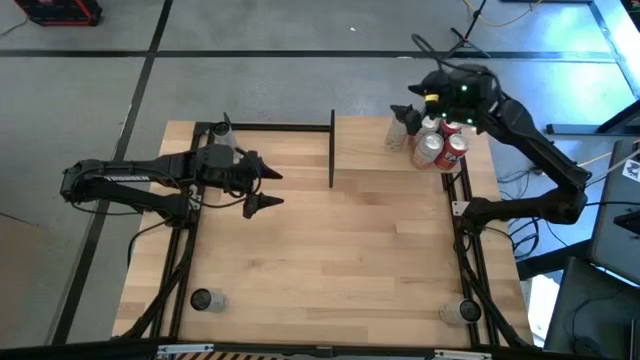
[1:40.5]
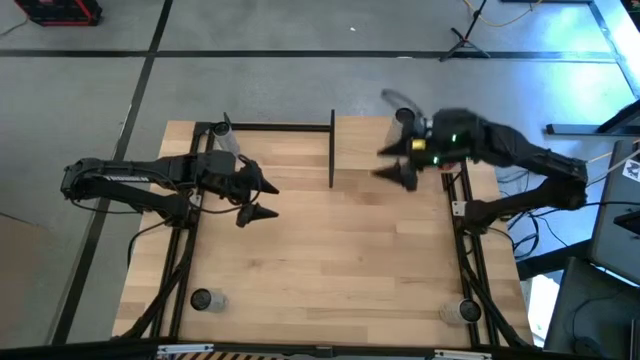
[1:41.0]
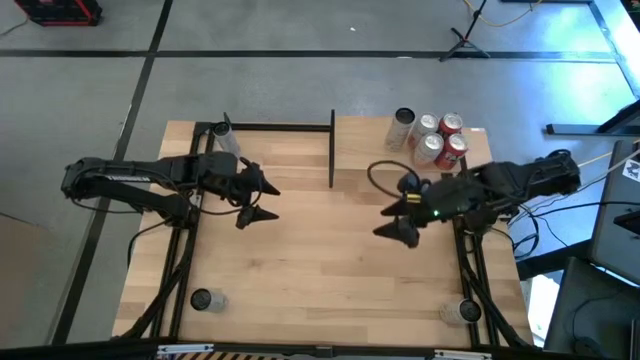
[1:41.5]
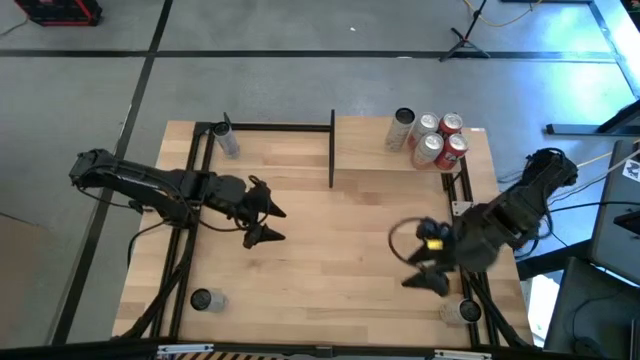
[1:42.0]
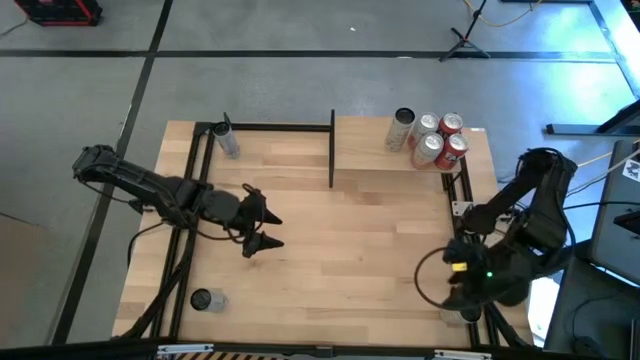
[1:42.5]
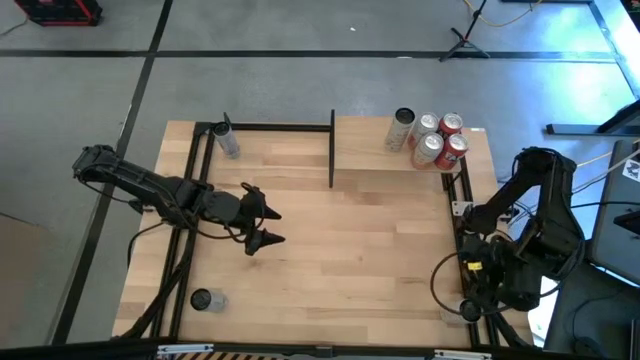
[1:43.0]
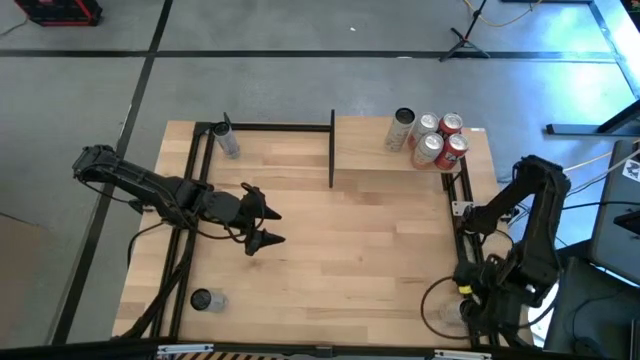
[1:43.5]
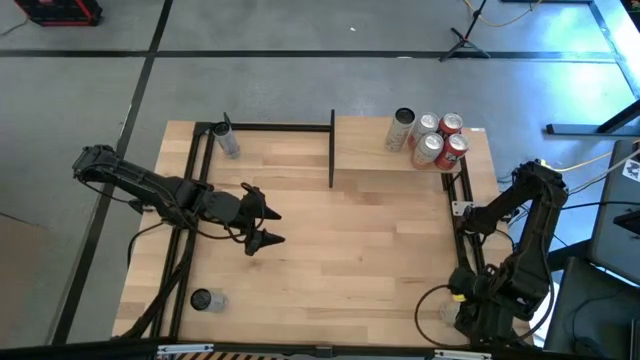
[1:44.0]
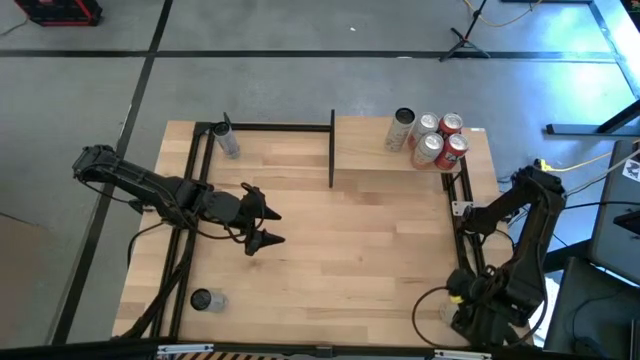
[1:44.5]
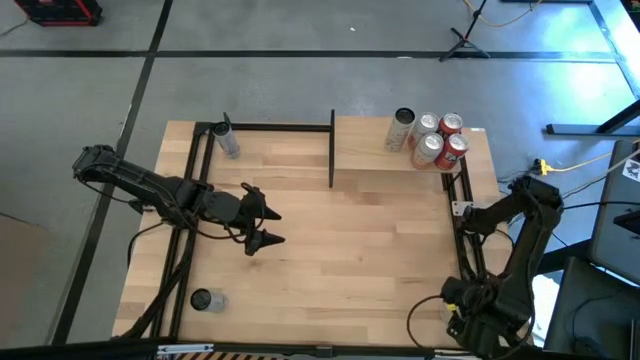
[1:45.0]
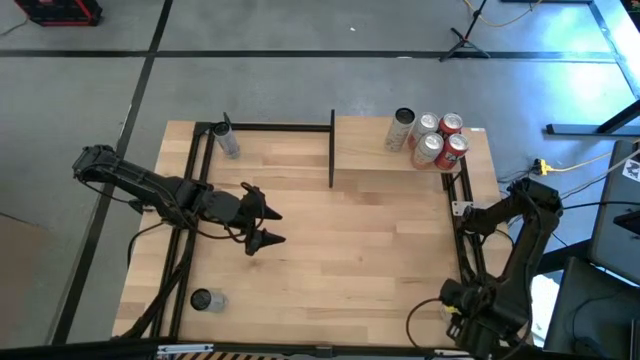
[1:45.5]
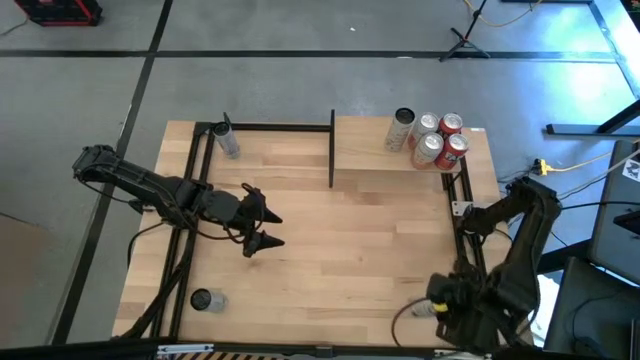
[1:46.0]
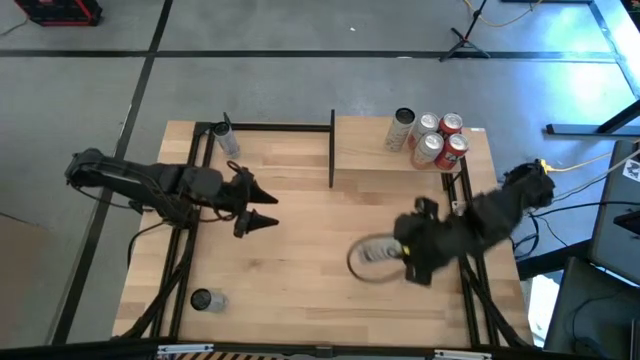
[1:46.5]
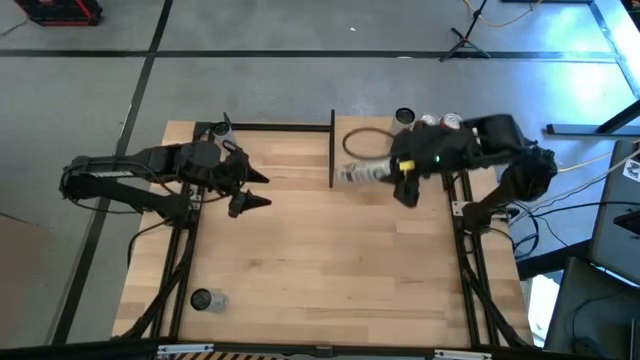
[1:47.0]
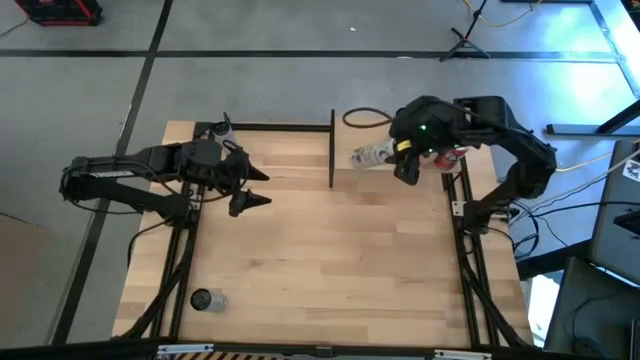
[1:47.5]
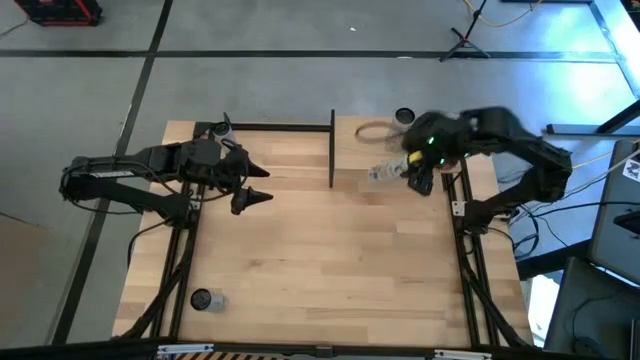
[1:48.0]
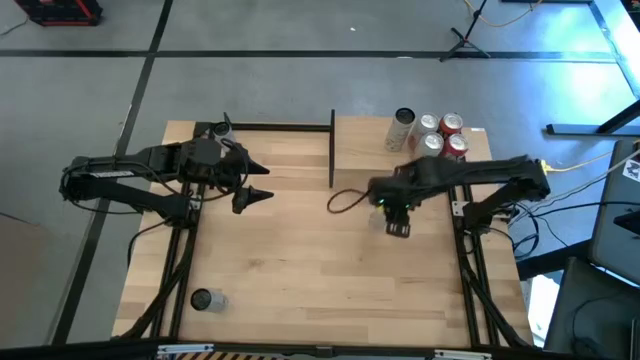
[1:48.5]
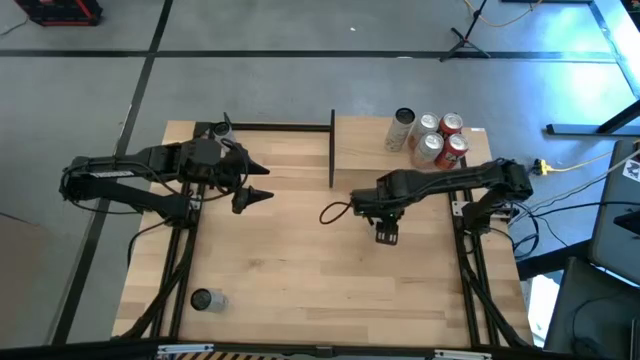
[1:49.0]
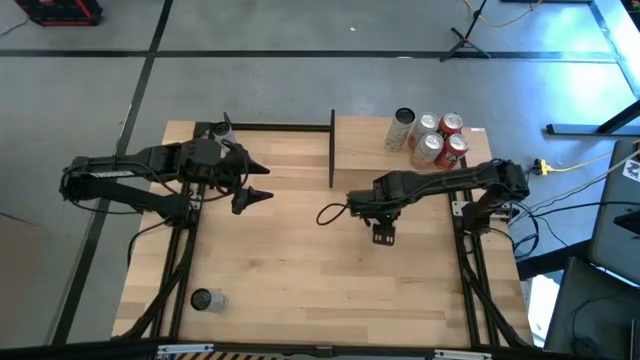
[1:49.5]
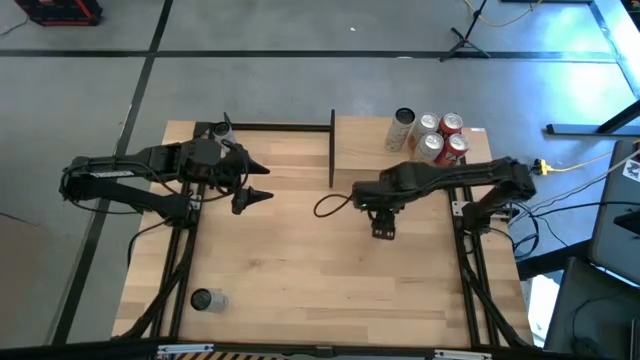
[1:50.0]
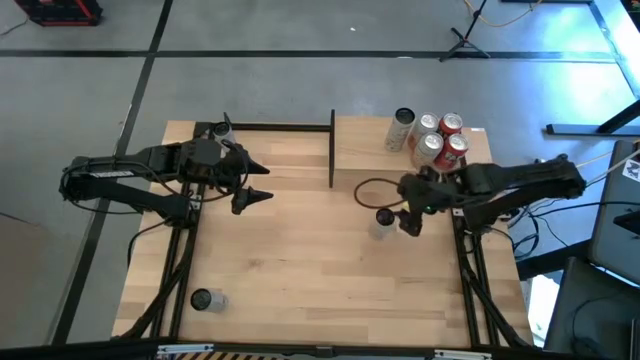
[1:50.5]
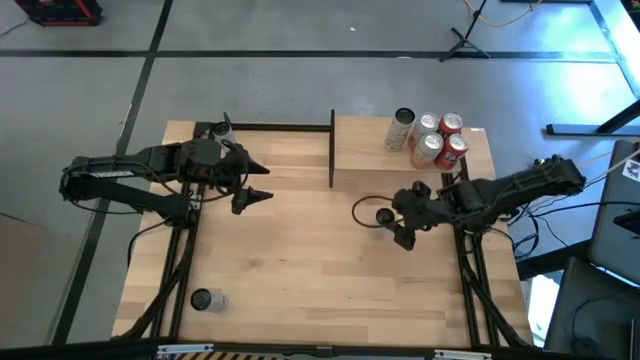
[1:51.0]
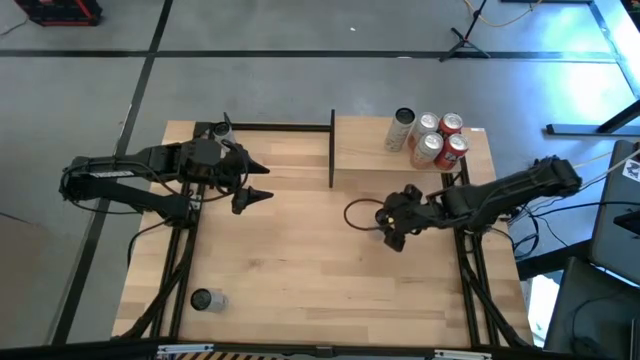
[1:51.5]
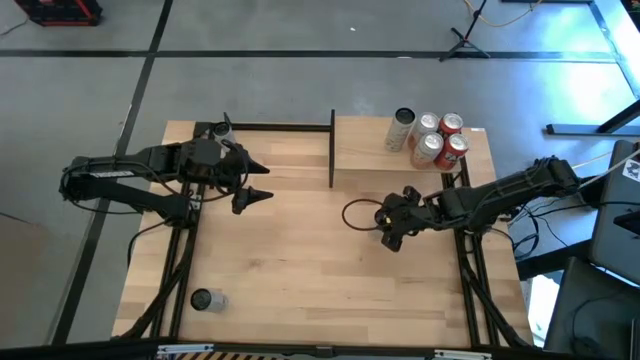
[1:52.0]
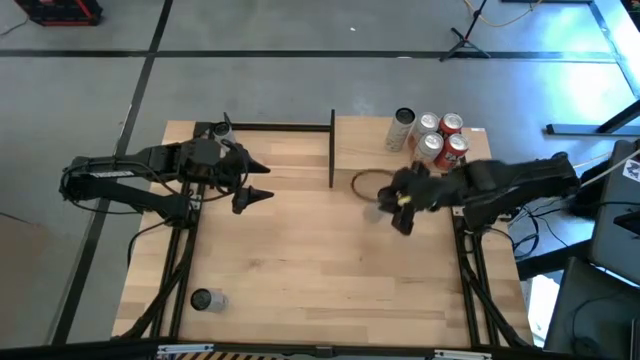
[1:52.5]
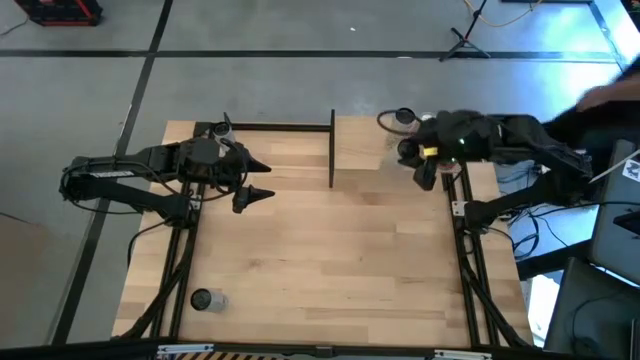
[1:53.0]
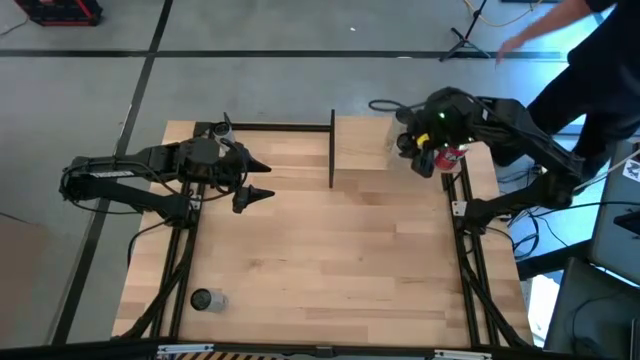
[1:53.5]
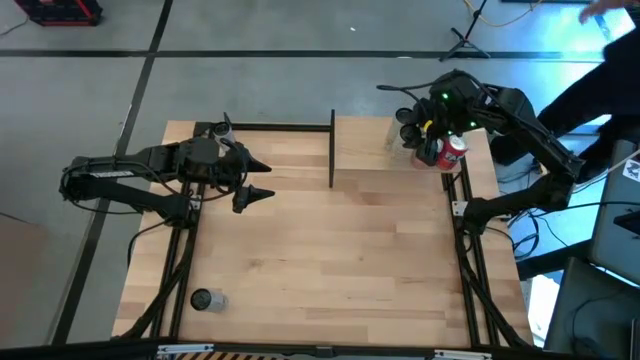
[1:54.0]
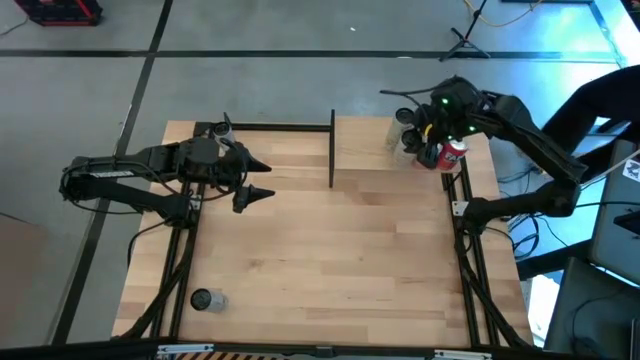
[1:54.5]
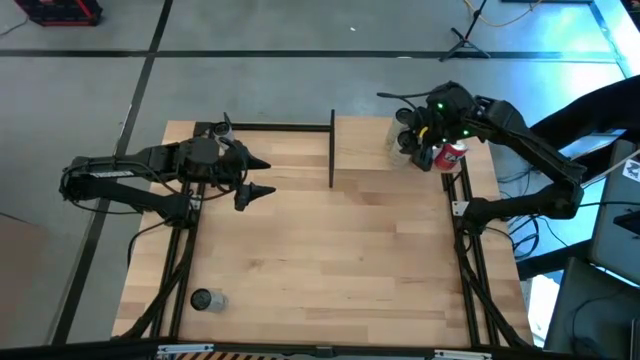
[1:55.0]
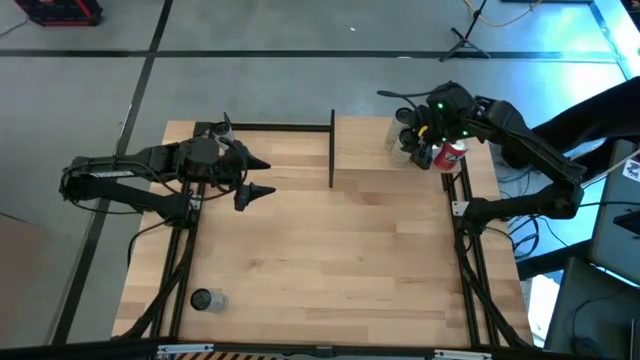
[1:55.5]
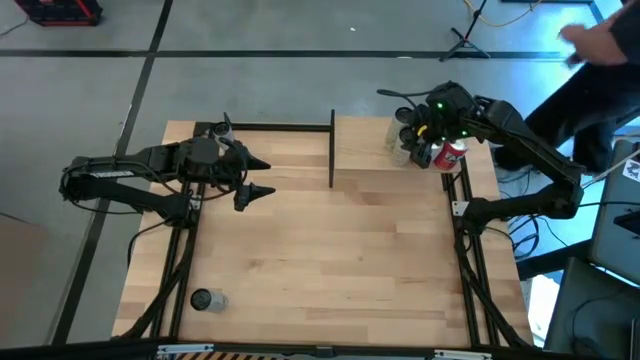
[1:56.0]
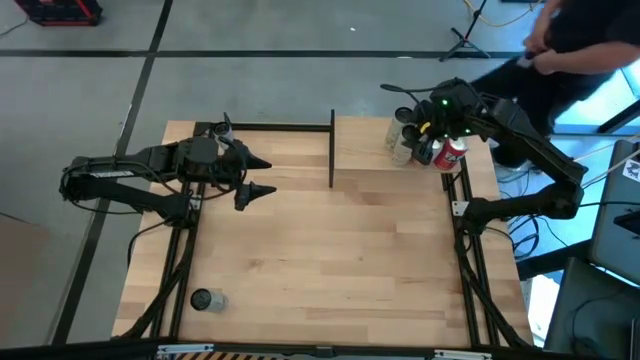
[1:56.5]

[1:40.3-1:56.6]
Task: Place canned beverage on shelf
Put the white yellow soda can on the shelf aligned with the other white yellow soda can

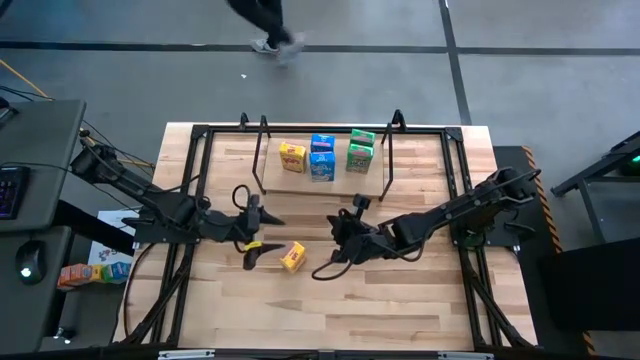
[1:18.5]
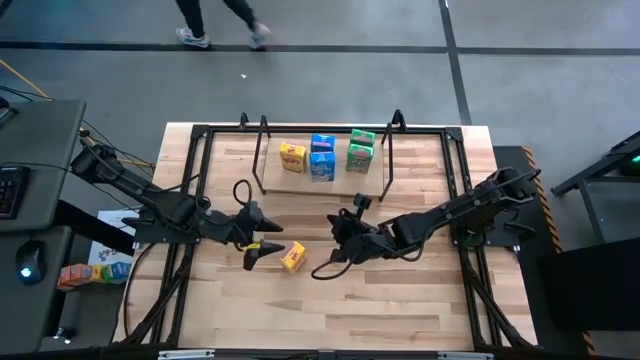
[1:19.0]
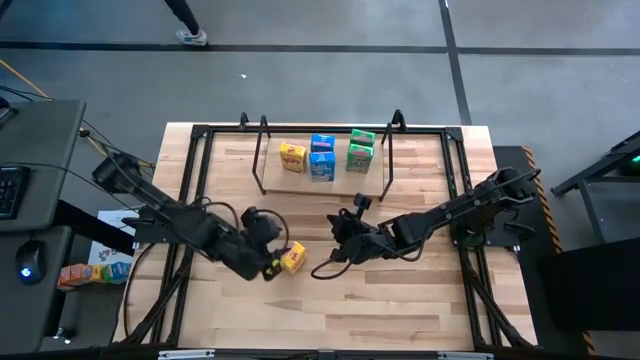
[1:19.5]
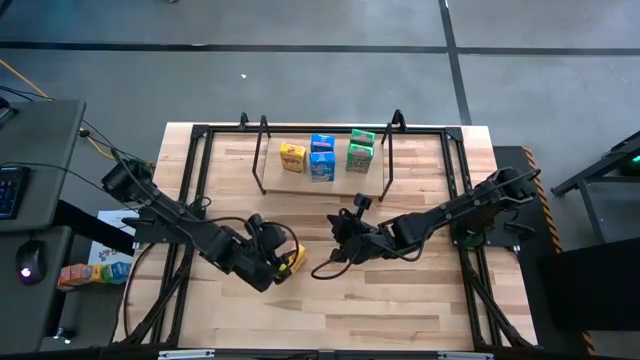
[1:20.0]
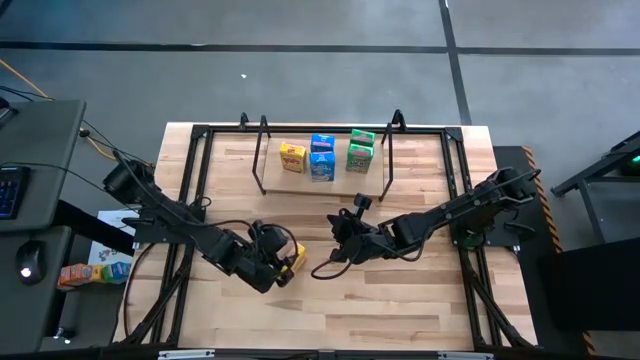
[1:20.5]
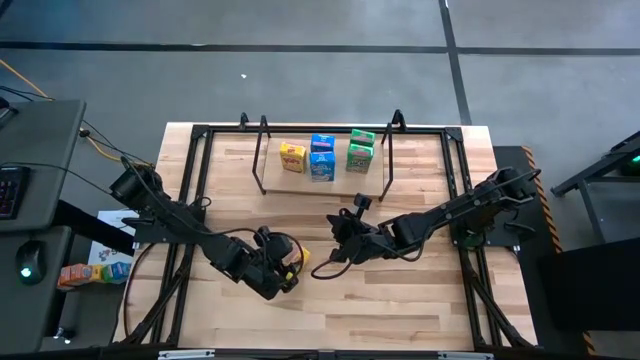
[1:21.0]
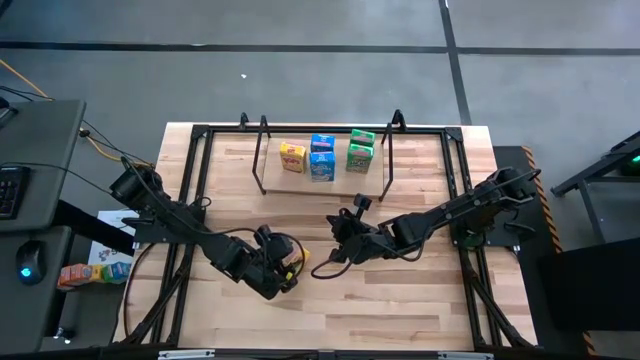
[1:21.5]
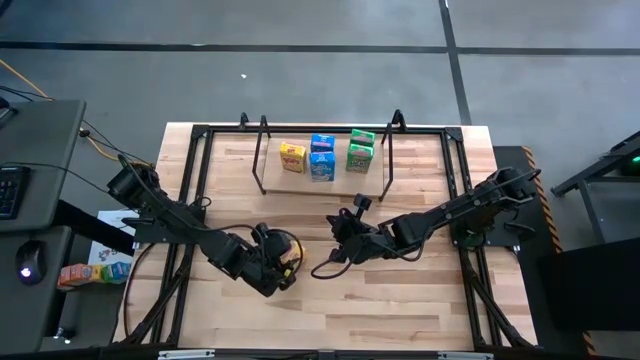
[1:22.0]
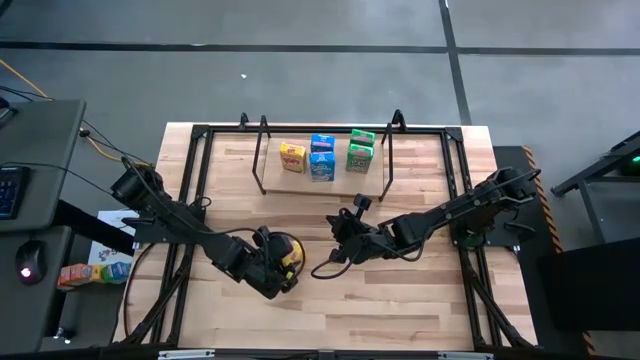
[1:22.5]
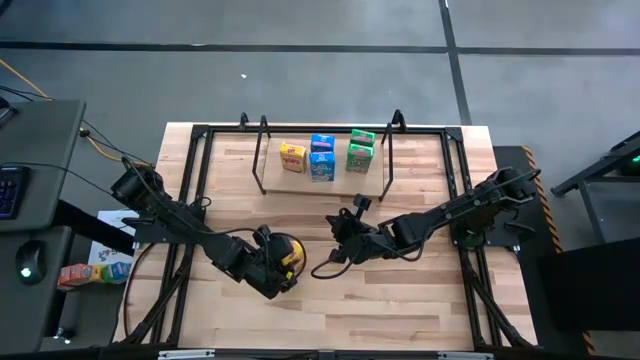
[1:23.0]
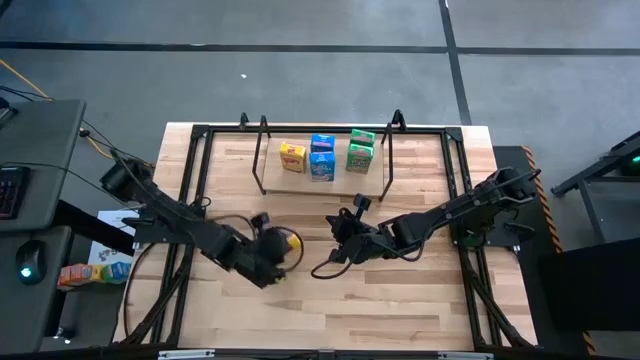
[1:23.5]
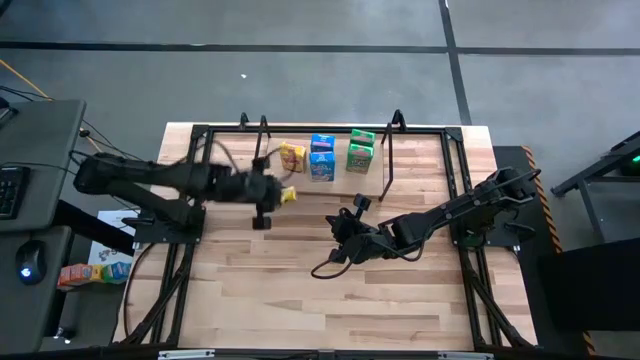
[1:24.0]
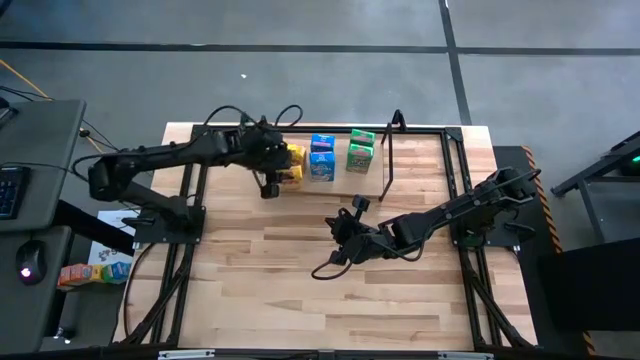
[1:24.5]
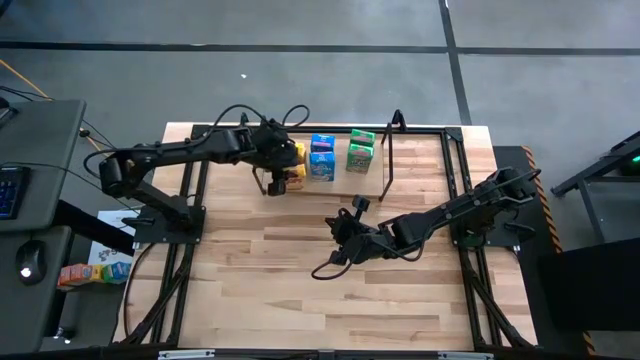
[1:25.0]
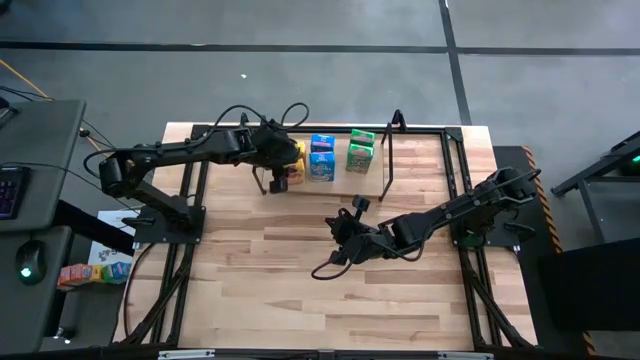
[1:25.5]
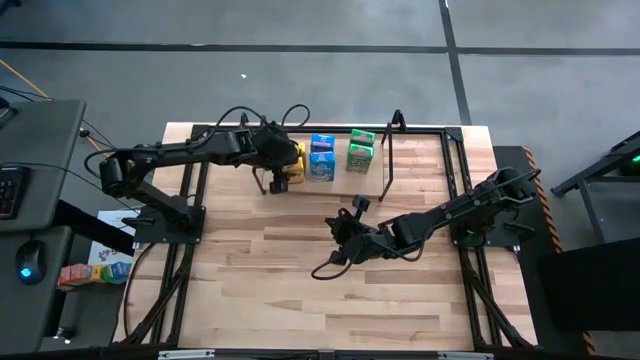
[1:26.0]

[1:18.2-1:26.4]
Task: Stack cereal on shelf
Put the yellow cereal box on the shelf
